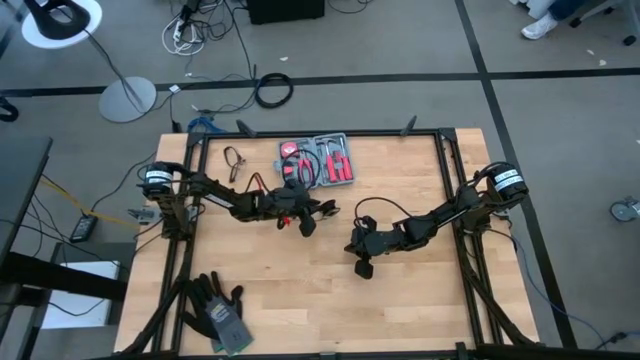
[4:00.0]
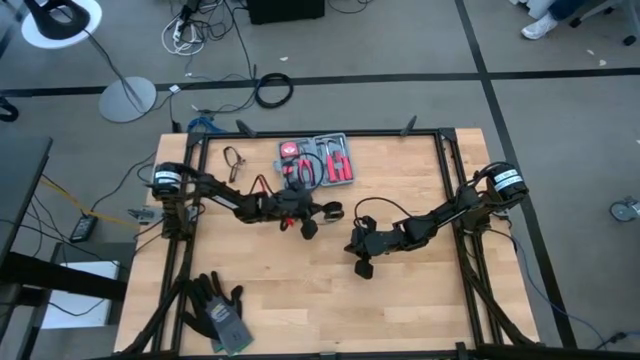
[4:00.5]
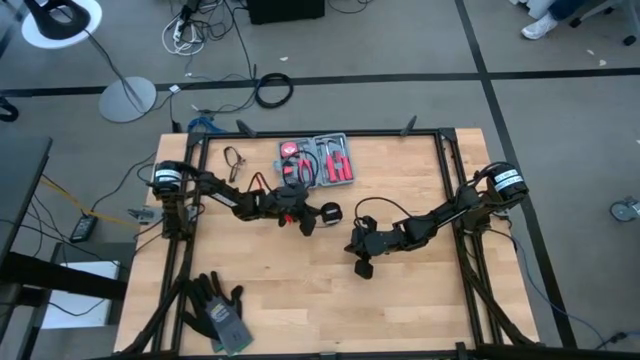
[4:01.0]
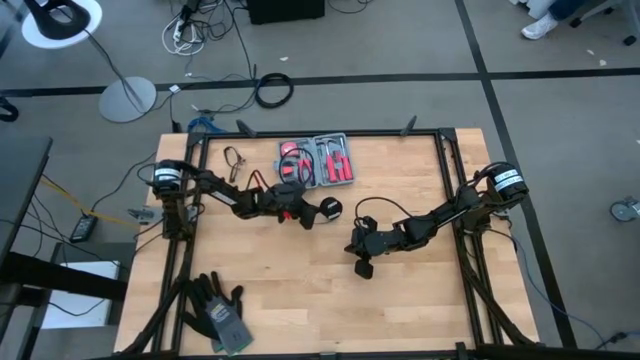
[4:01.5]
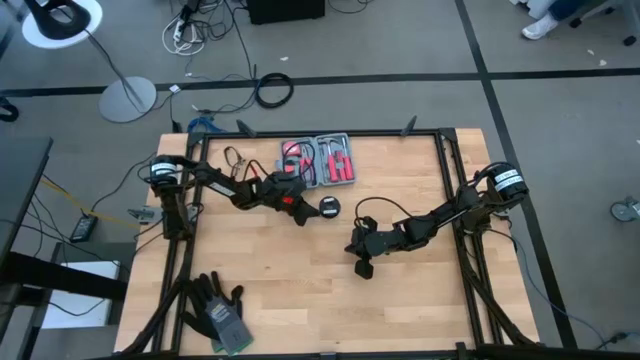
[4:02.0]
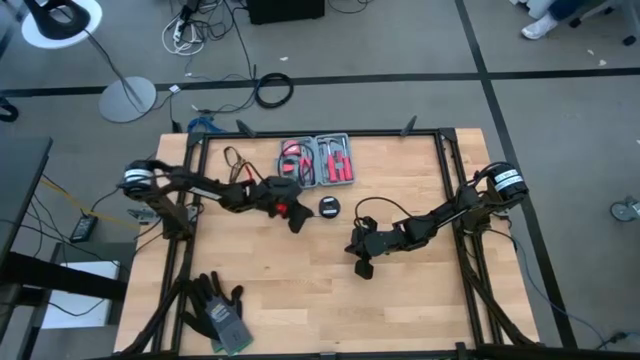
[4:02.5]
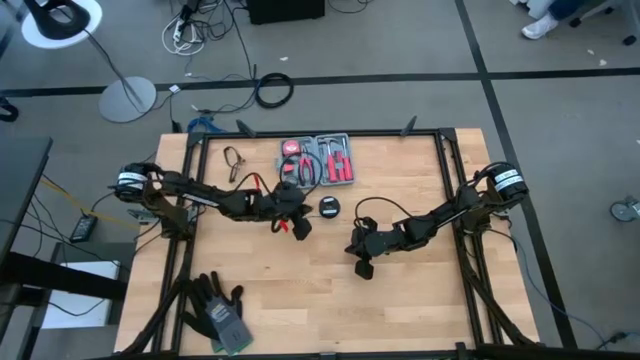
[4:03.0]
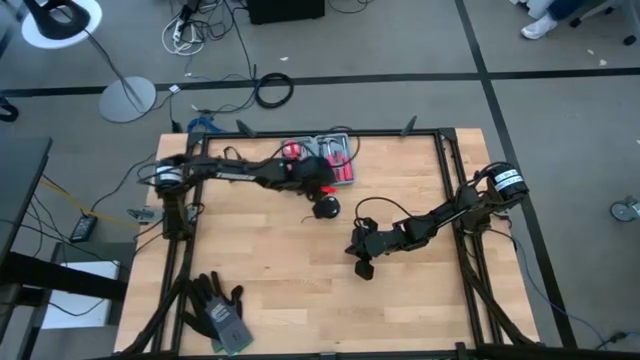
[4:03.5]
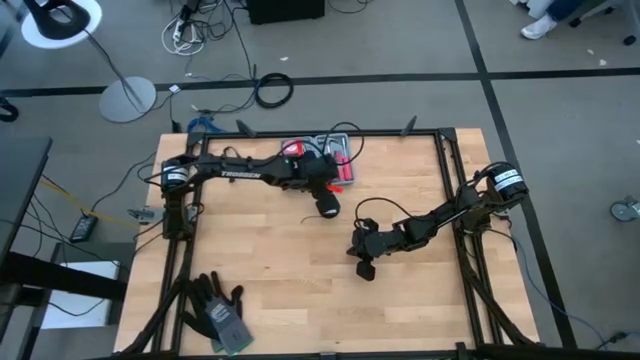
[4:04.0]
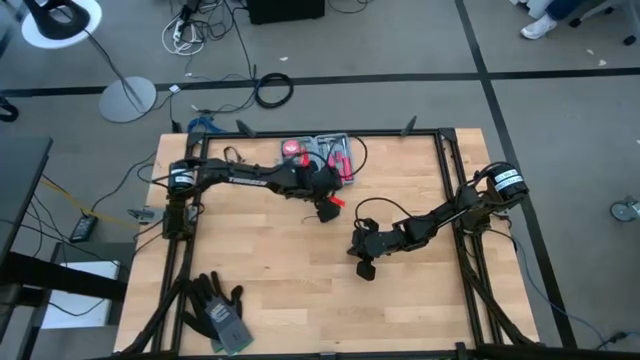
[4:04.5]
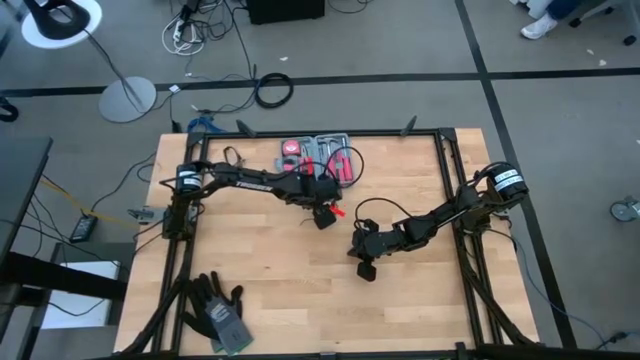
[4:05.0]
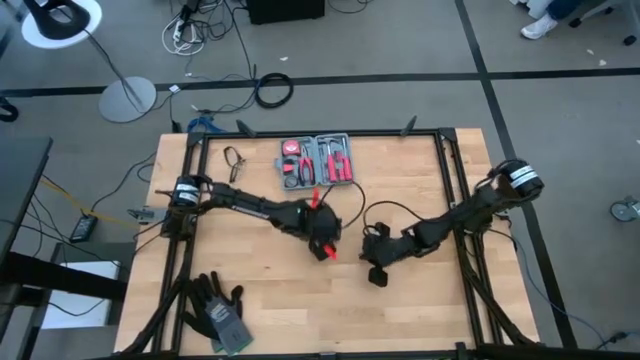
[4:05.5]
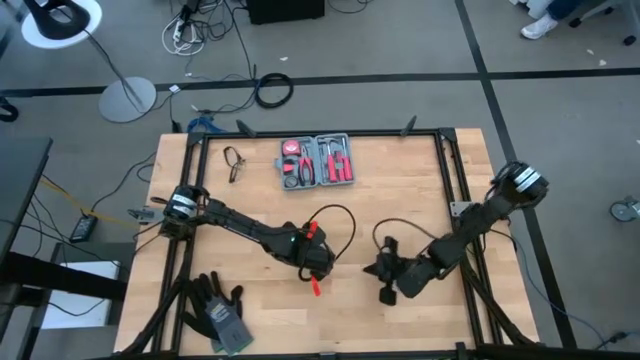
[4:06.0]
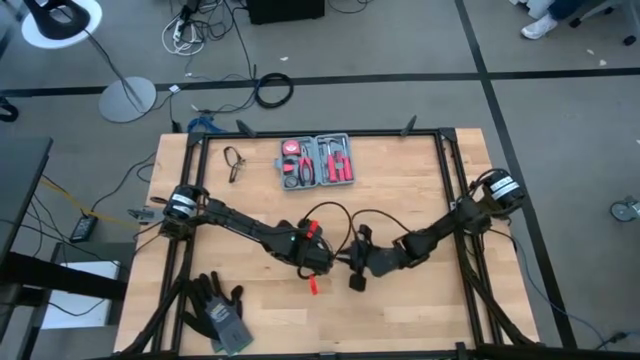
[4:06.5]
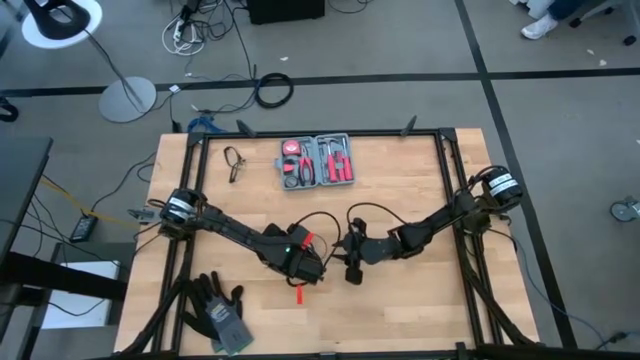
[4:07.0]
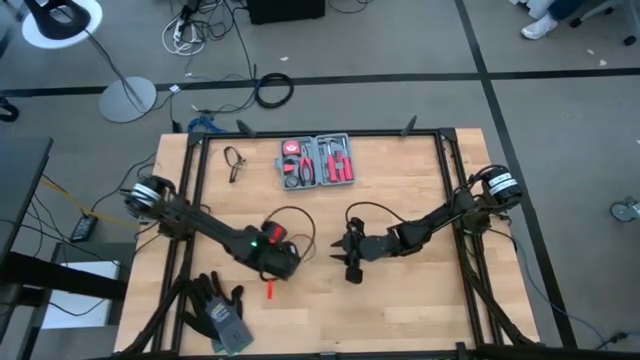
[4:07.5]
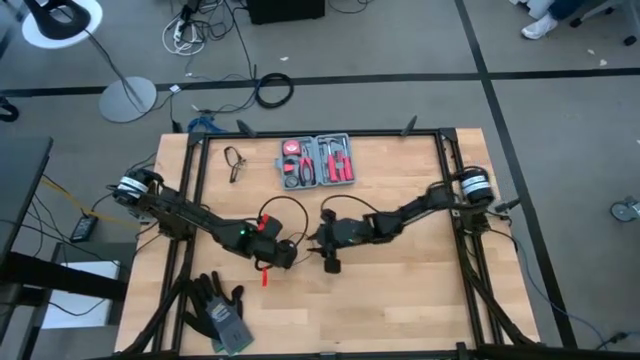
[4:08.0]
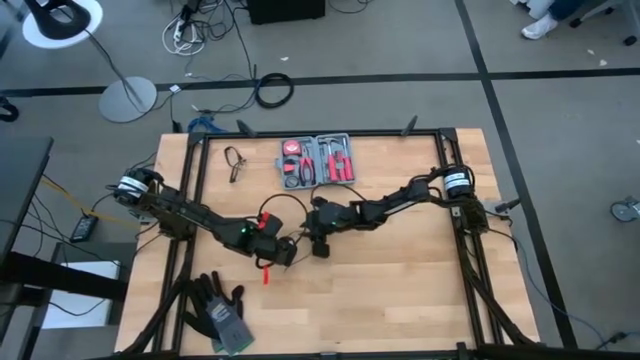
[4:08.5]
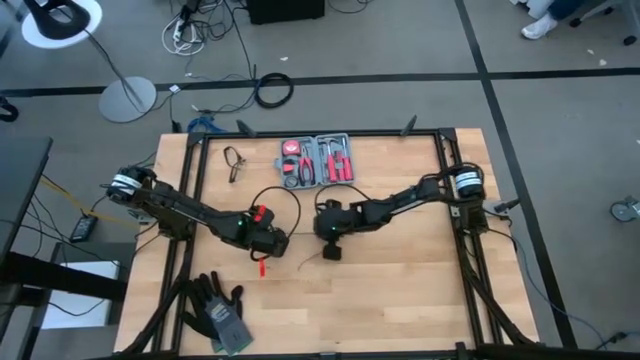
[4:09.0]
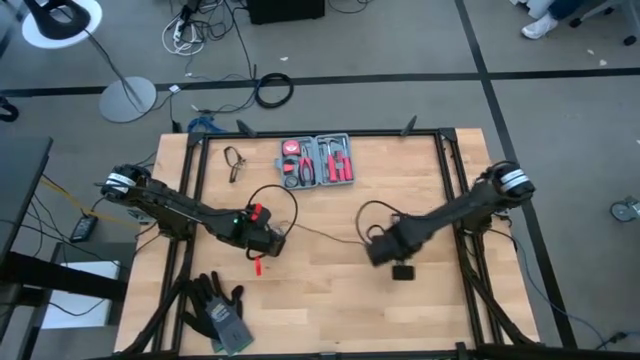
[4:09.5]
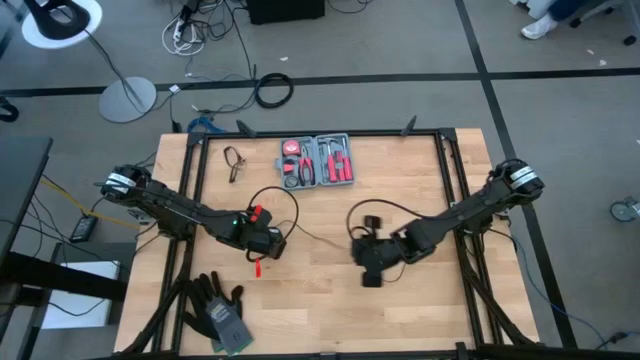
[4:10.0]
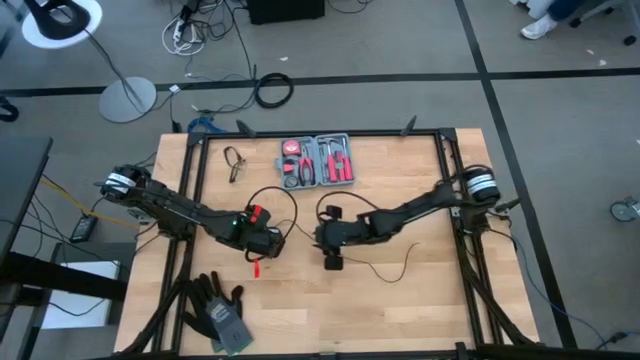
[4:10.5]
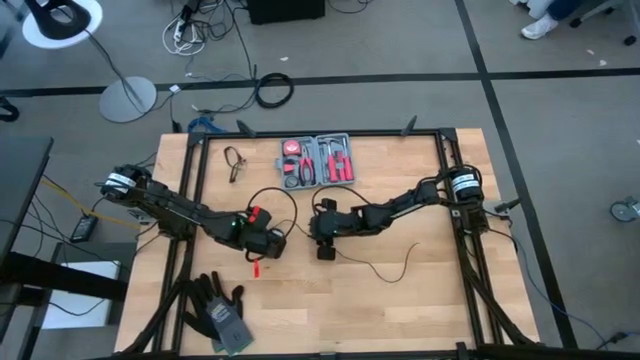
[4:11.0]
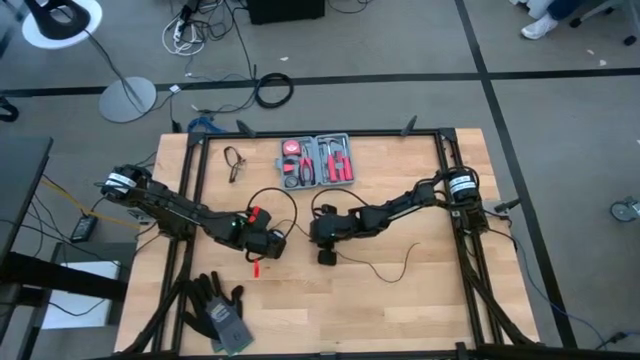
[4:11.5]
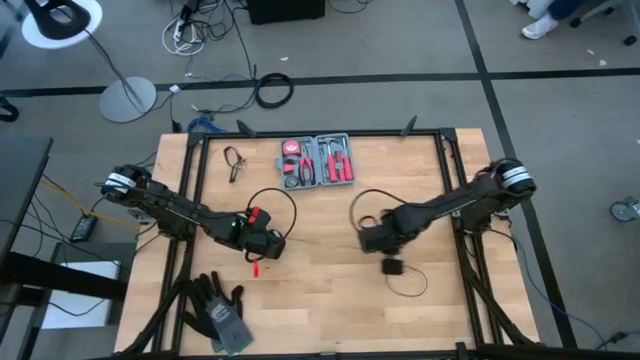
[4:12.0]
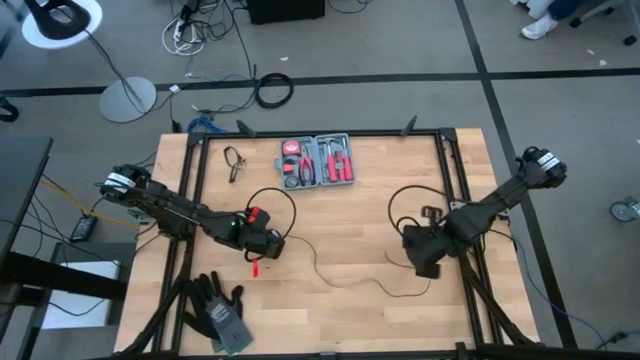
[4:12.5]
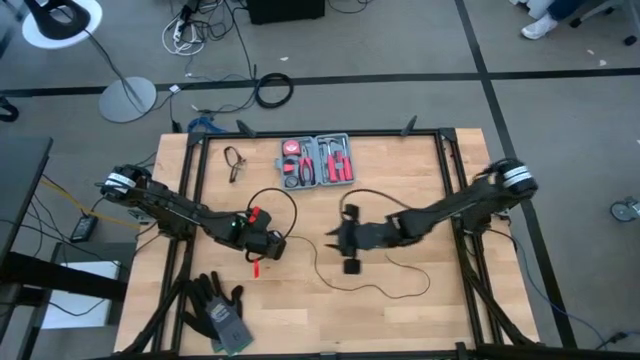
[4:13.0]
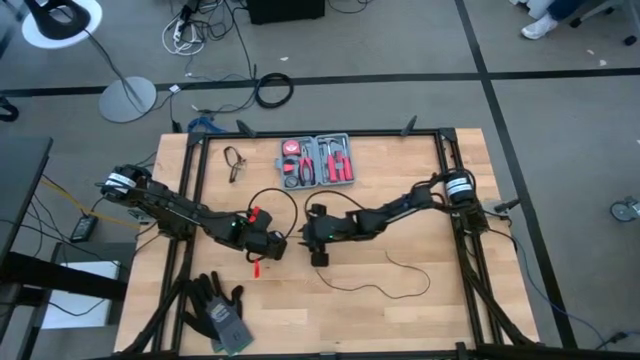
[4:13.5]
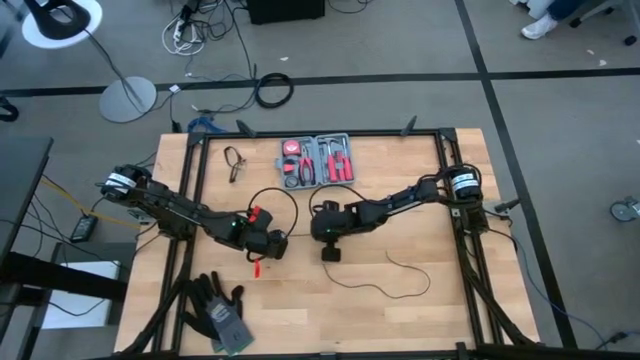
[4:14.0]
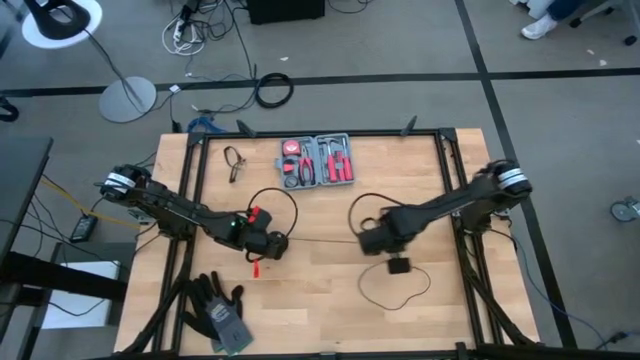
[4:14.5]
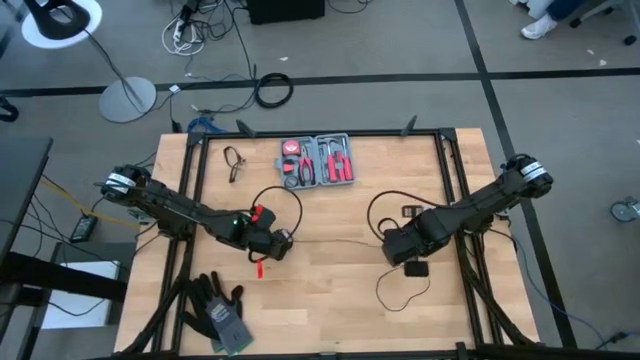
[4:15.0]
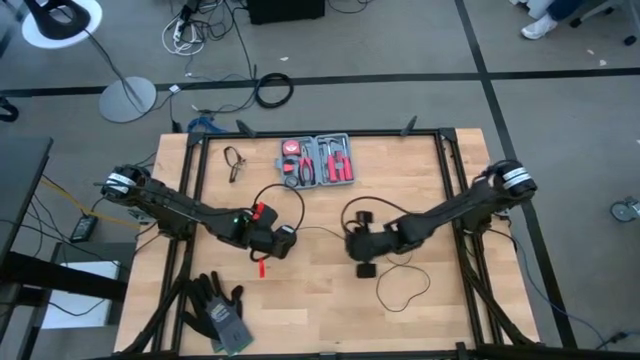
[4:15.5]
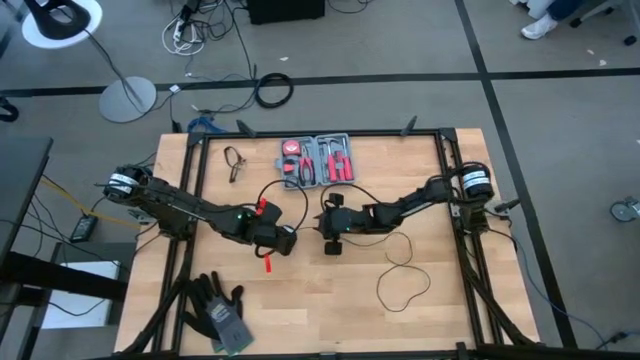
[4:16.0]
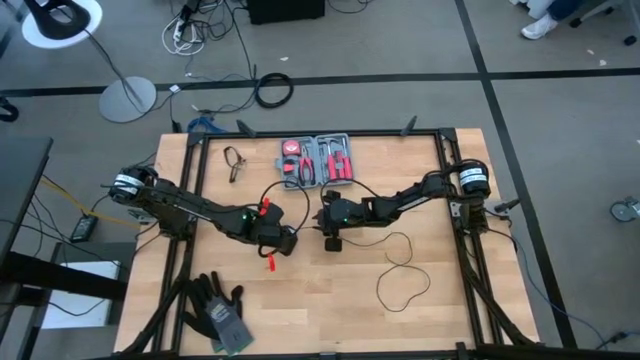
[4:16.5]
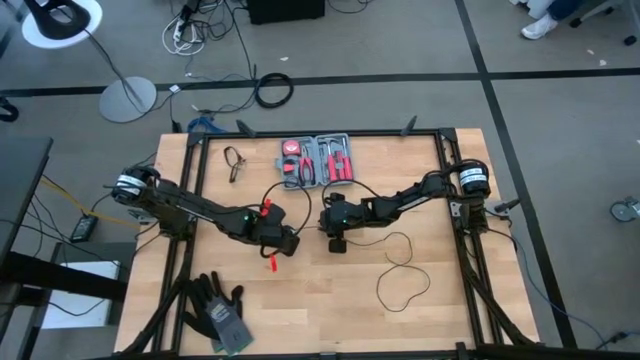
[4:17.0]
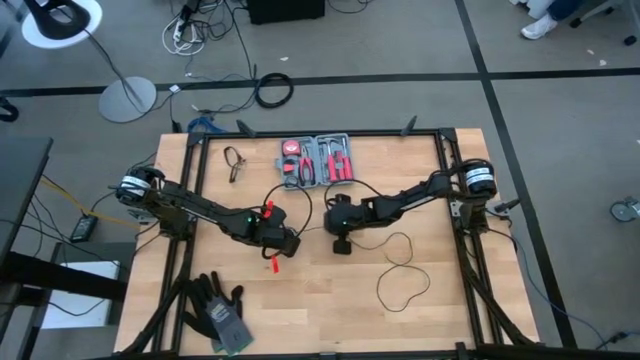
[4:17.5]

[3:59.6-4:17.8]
Task: Coil cords
Uncoil the black wire from the black spool

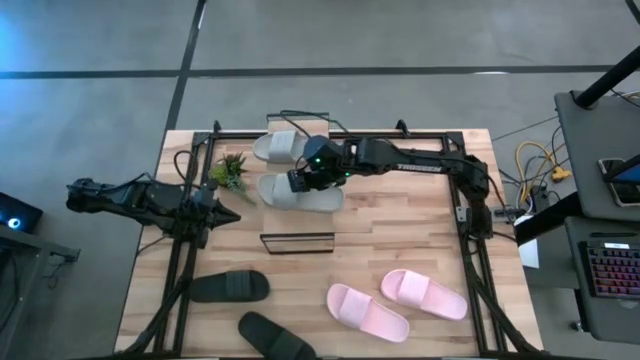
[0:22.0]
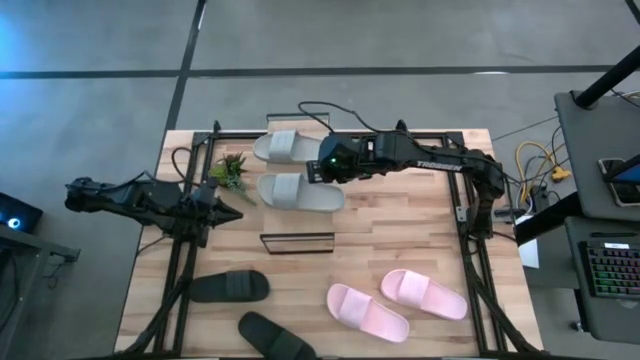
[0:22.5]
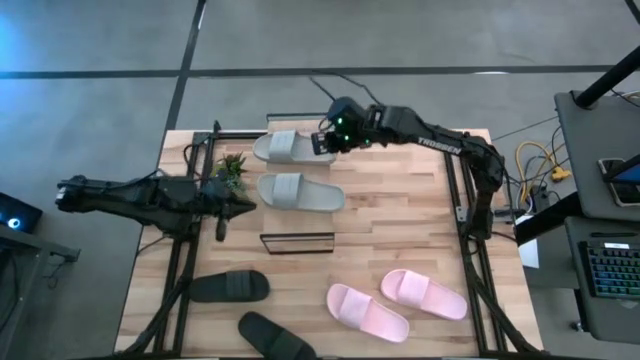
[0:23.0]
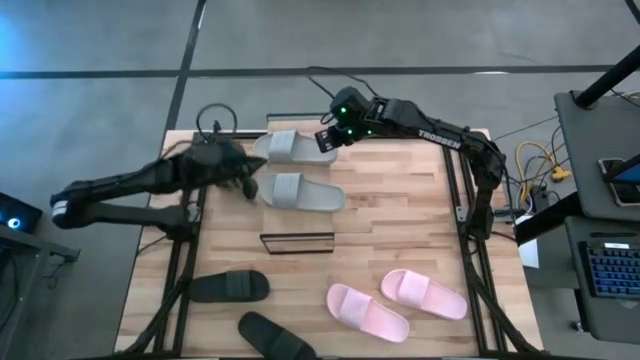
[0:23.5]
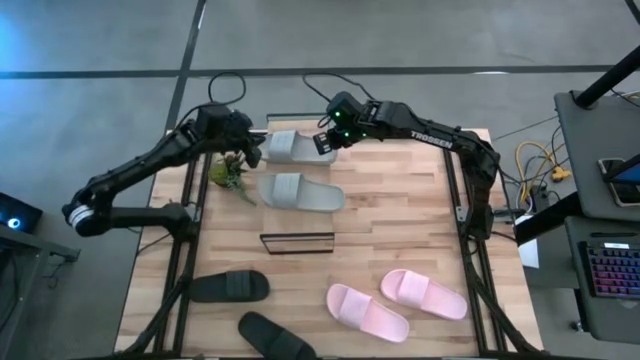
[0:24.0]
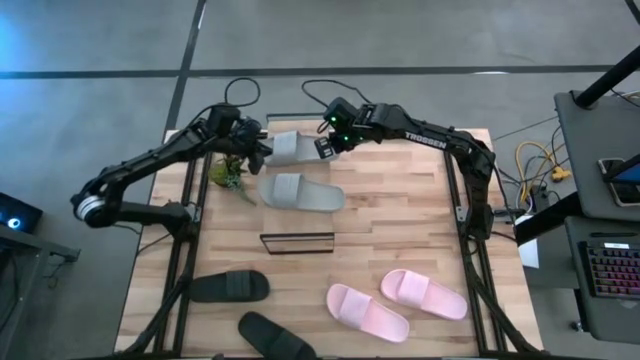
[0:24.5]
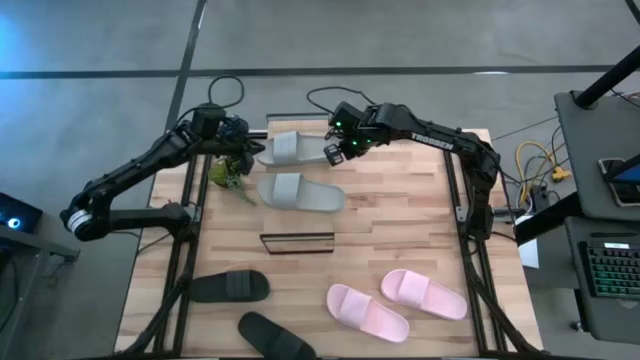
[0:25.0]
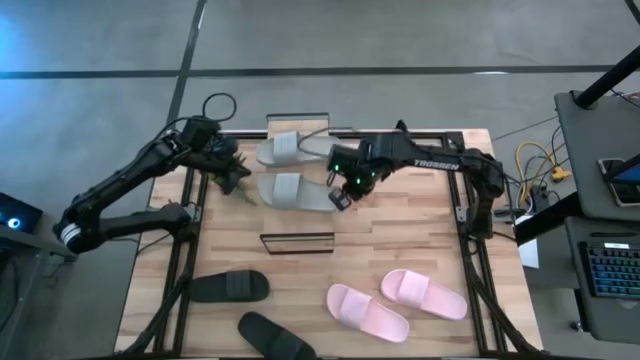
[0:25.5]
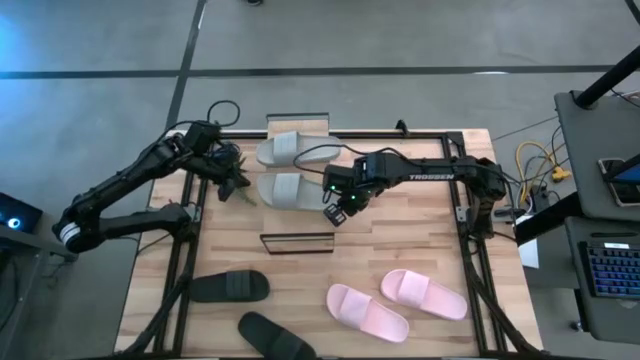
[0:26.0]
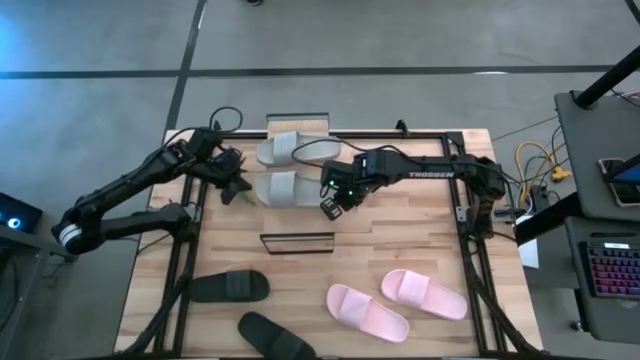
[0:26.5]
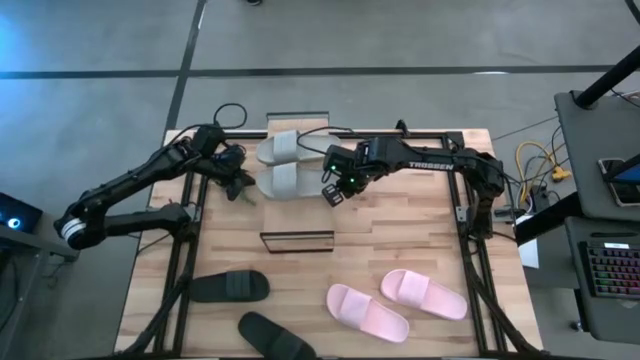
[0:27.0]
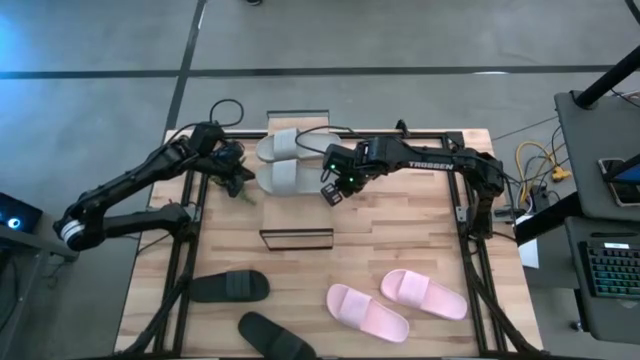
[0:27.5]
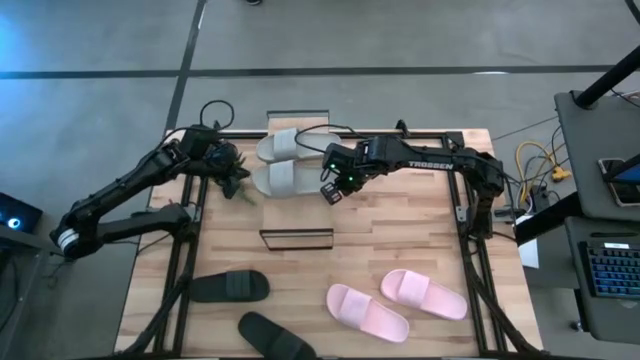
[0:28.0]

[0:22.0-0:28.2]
Task: Pick and place slides into the shelf
Adjust the gray slides on the shelf
